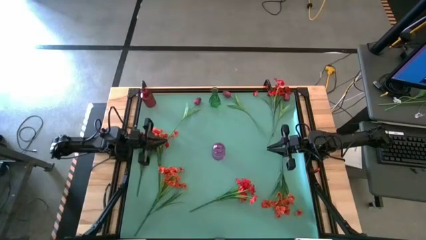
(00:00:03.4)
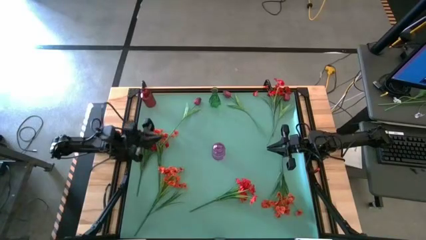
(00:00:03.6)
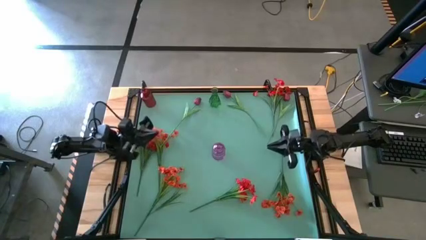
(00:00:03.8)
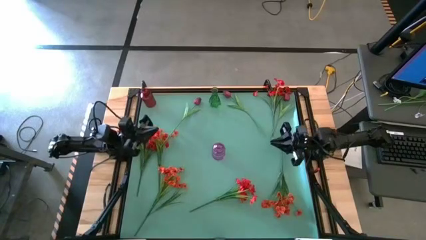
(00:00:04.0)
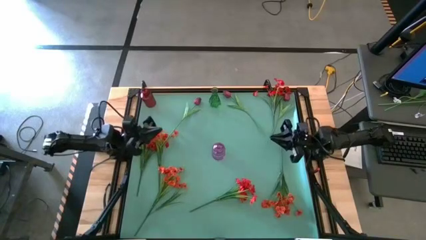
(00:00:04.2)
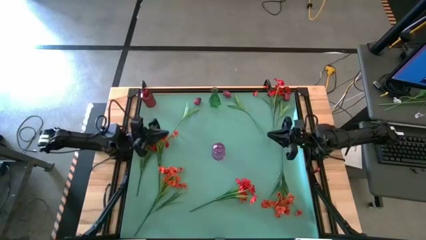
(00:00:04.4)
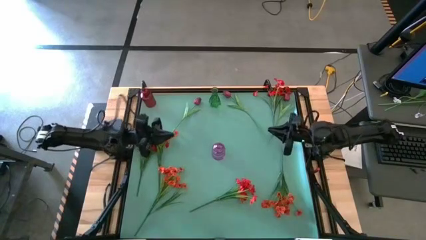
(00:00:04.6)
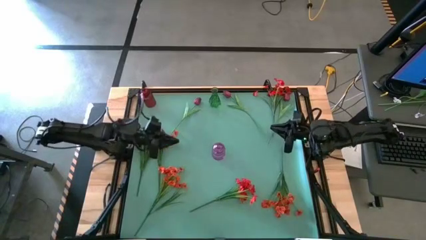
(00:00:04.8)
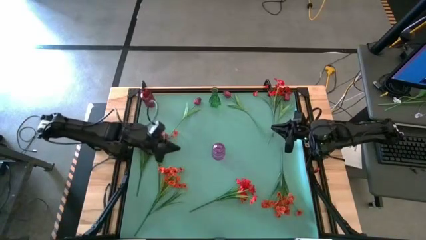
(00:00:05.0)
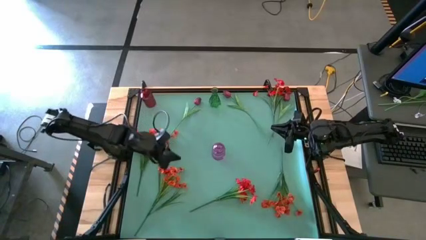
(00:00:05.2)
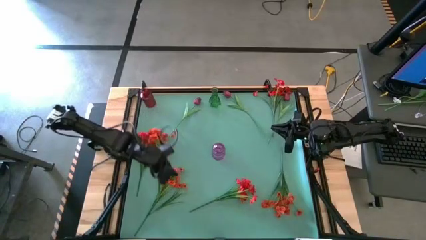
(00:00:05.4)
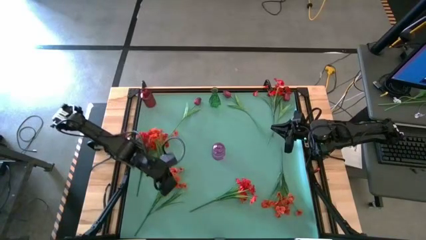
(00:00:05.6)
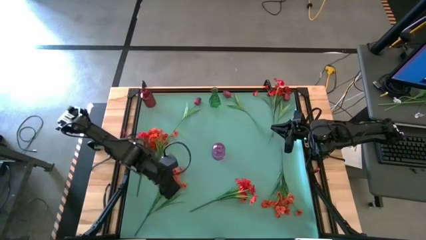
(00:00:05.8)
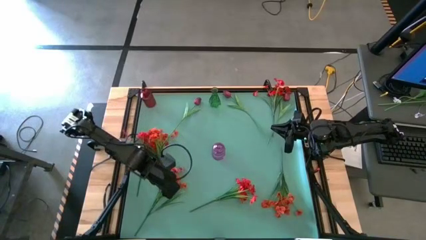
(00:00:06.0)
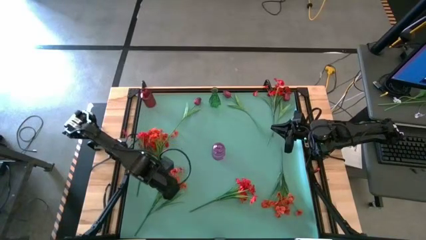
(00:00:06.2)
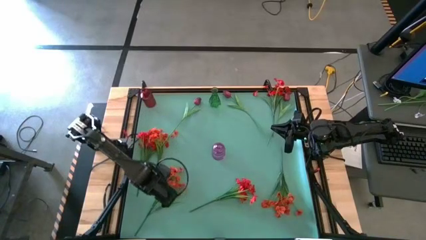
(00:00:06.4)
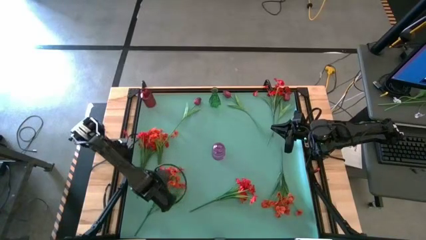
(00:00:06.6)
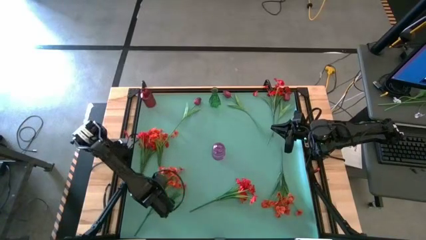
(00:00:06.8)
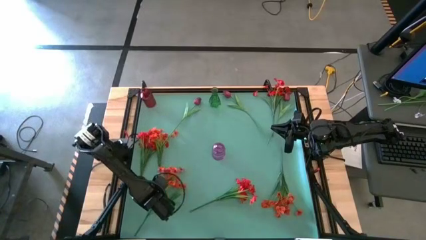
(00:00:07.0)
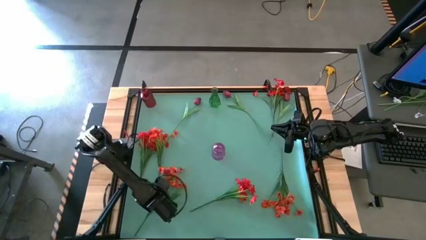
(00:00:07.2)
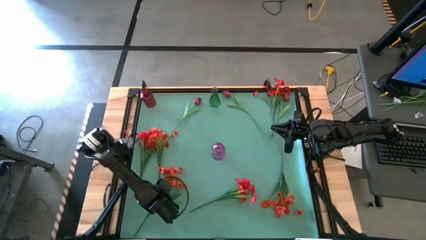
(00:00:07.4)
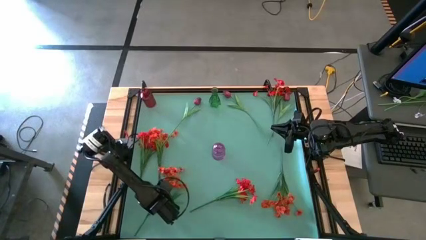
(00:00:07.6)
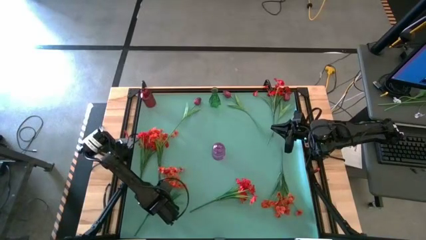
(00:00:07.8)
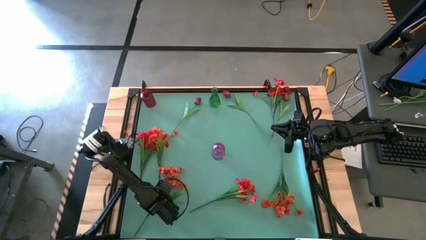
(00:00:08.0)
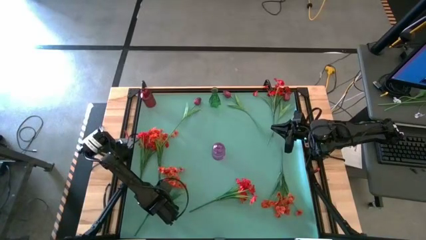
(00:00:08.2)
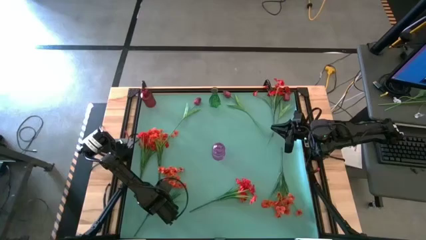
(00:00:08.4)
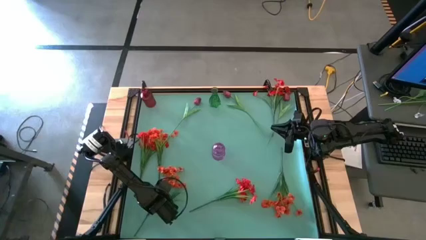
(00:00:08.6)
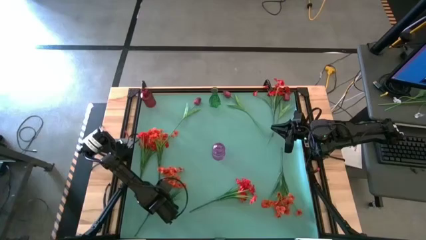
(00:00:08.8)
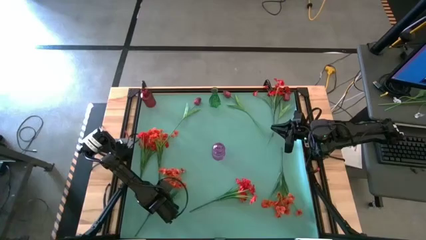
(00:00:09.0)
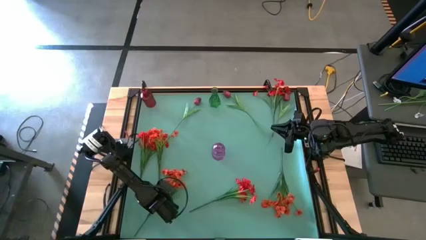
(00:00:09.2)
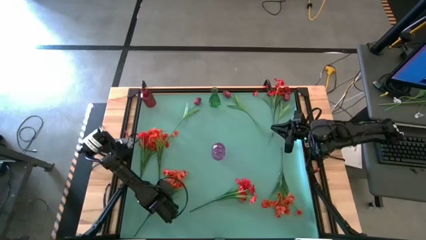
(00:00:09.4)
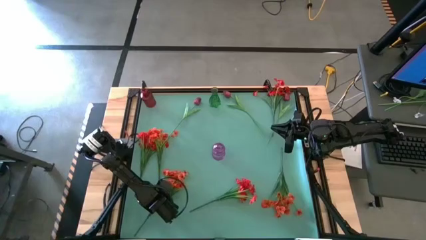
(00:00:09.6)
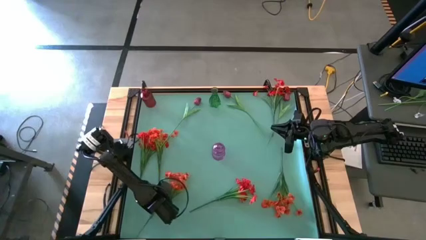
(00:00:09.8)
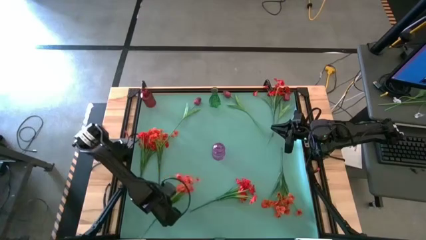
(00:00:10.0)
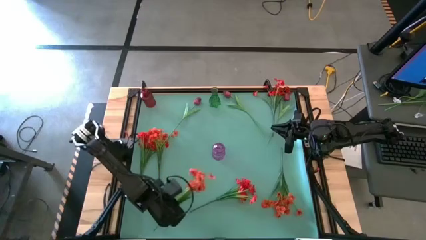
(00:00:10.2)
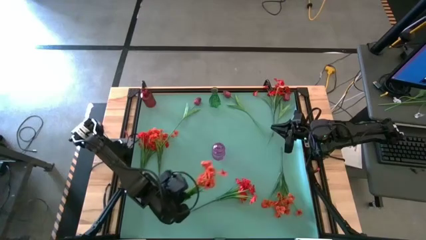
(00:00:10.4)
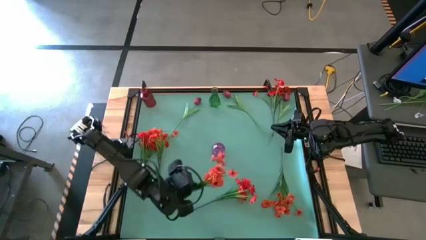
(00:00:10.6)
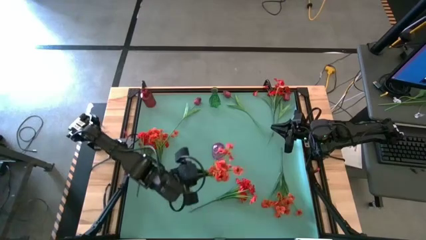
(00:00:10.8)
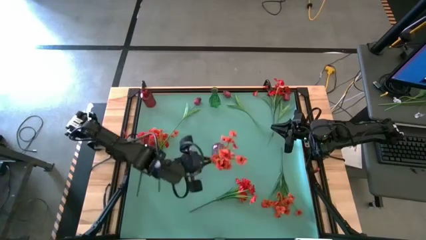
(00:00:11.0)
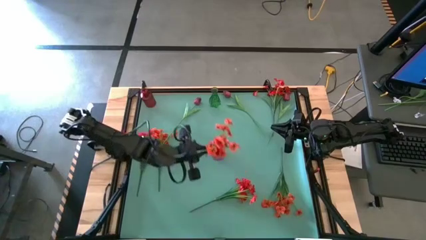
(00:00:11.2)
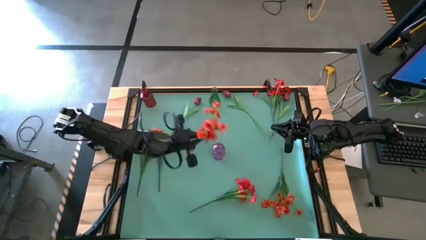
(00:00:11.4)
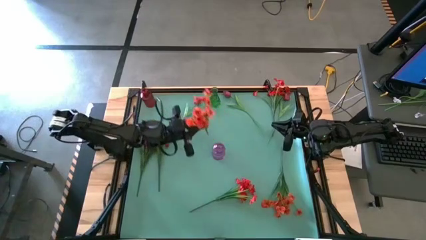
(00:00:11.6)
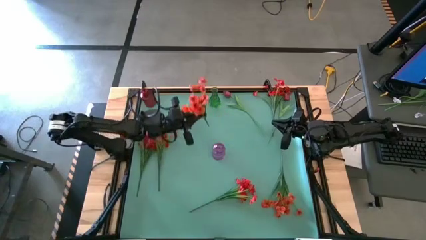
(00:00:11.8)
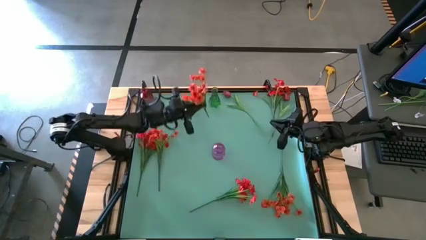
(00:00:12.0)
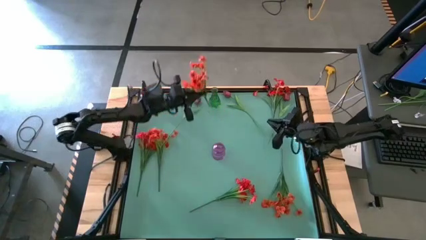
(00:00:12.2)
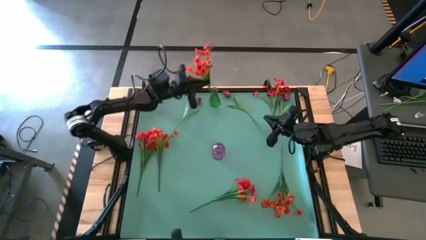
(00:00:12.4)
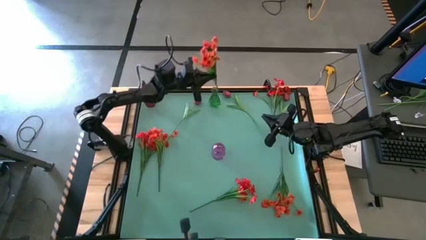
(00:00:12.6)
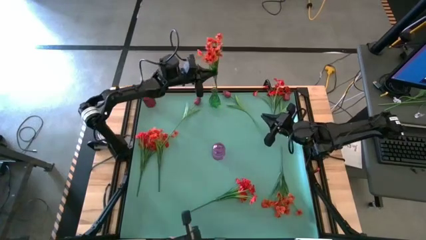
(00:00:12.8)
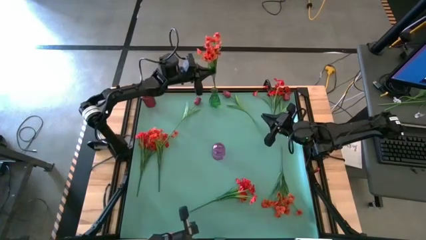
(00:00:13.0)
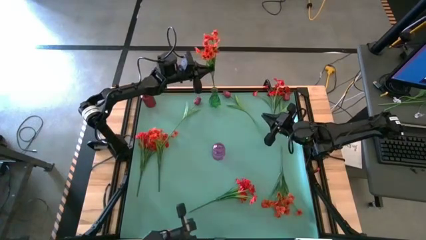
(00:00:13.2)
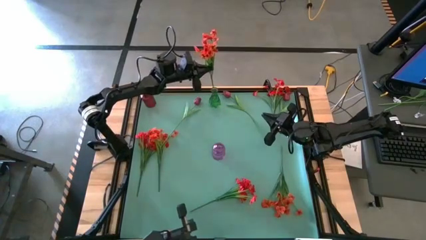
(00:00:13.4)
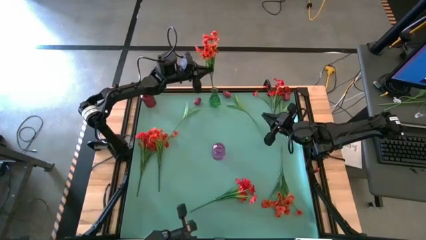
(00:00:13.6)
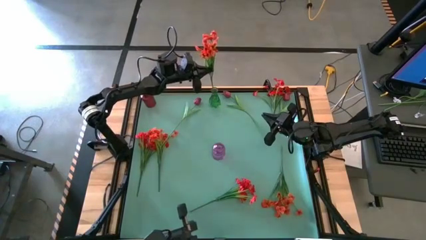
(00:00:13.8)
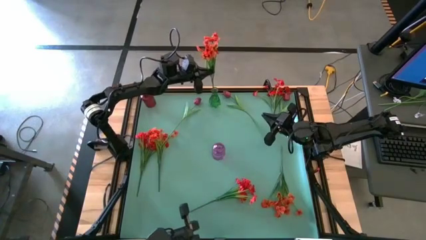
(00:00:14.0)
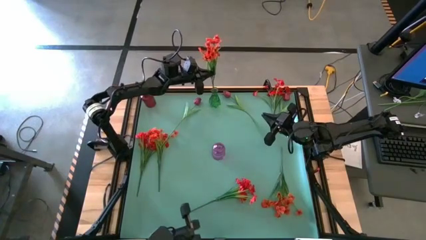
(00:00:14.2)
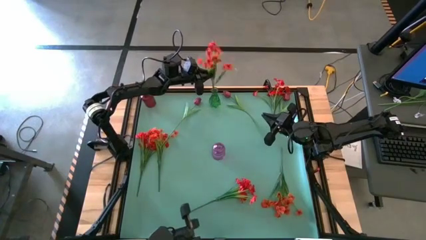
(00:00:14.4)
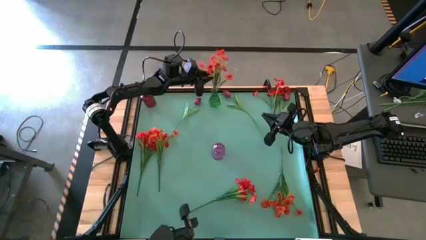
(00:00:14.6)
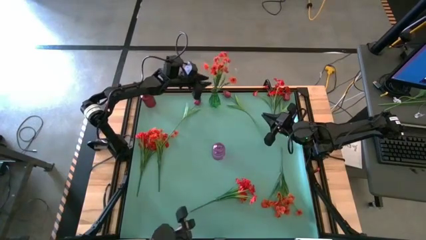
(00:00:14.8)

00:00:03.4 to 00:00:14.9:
Task: Sort flowers into vase by color
Put the orange flowers into the green vase
